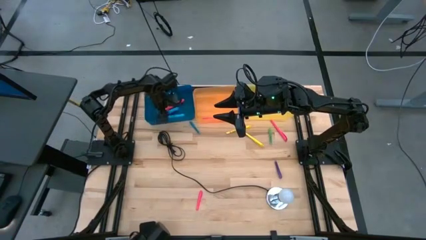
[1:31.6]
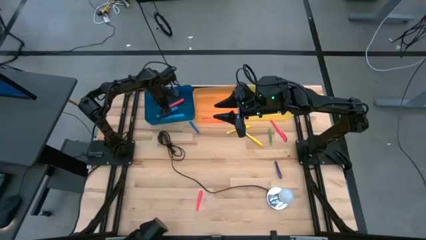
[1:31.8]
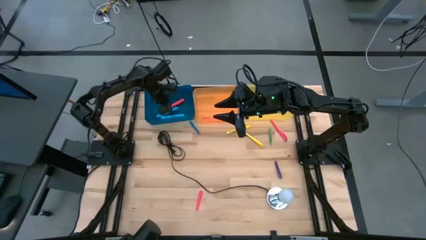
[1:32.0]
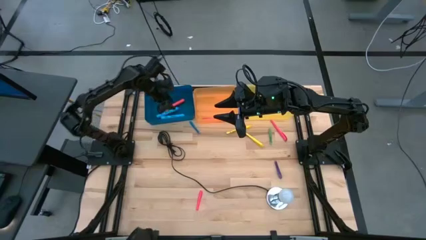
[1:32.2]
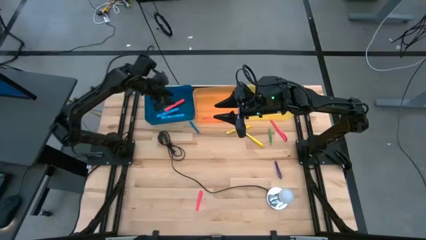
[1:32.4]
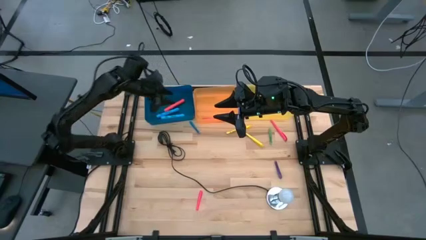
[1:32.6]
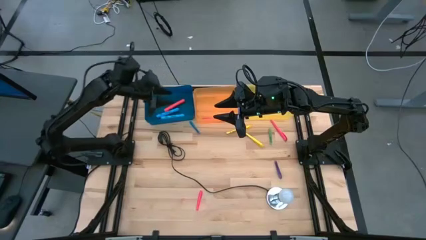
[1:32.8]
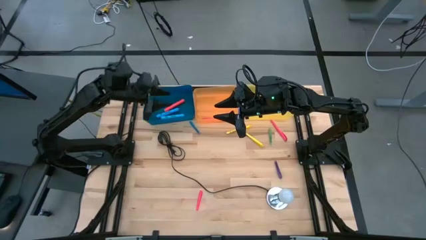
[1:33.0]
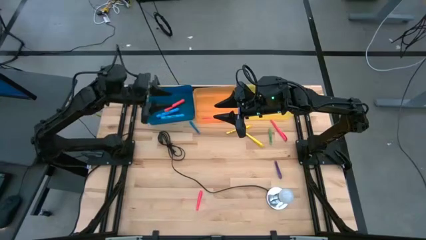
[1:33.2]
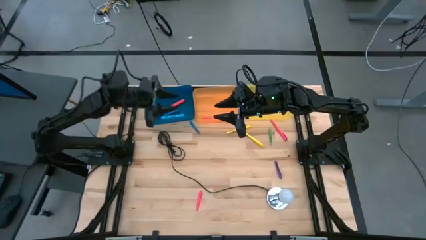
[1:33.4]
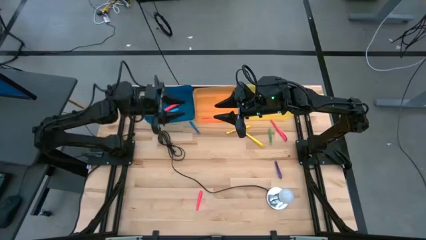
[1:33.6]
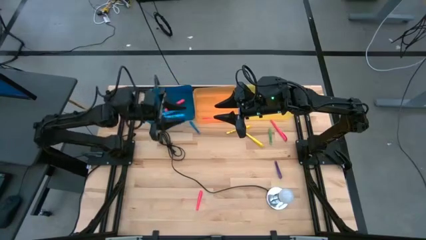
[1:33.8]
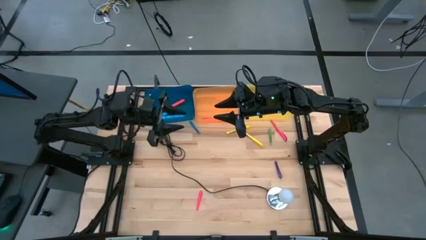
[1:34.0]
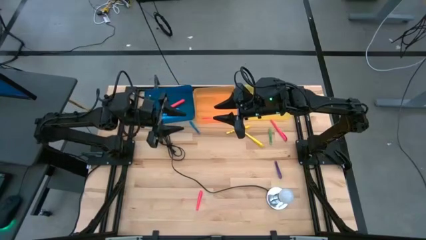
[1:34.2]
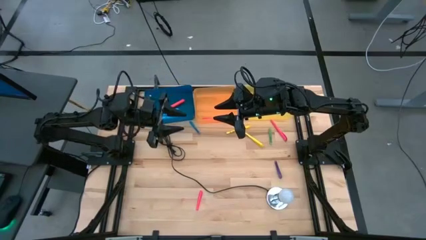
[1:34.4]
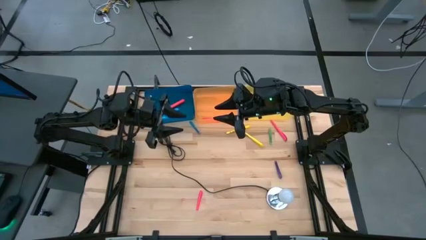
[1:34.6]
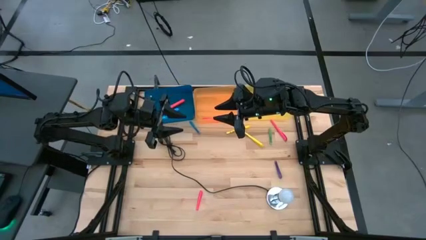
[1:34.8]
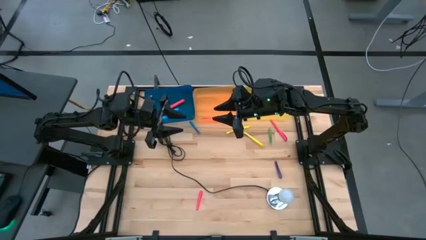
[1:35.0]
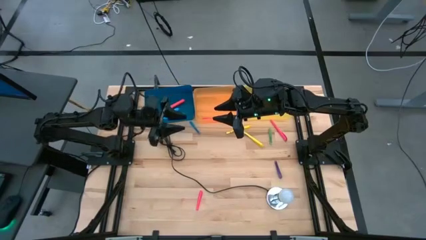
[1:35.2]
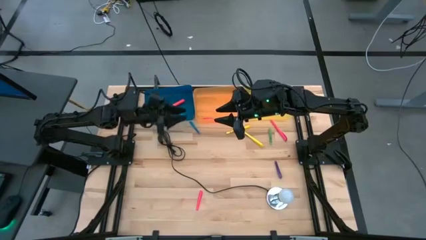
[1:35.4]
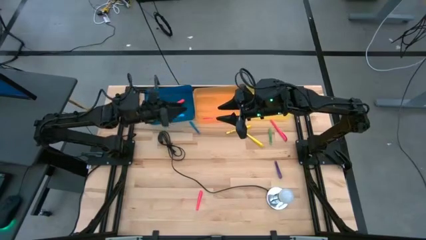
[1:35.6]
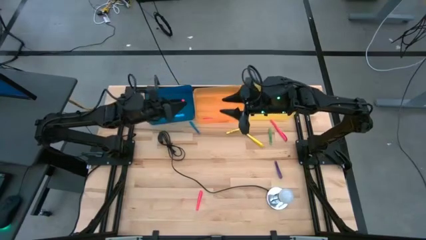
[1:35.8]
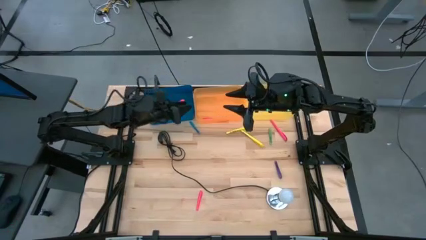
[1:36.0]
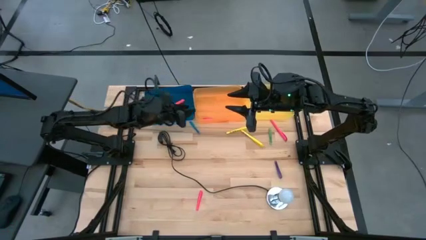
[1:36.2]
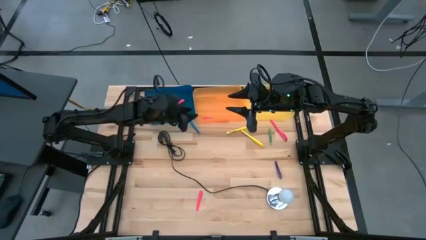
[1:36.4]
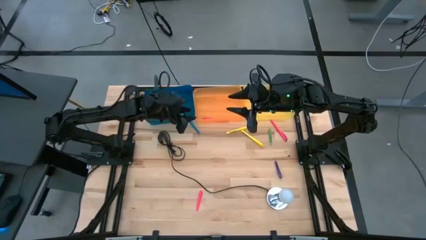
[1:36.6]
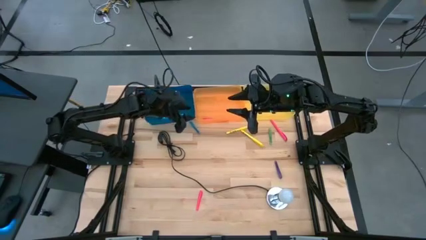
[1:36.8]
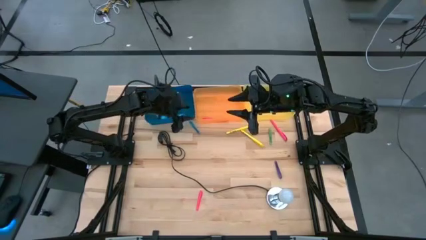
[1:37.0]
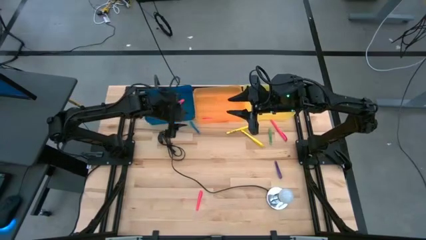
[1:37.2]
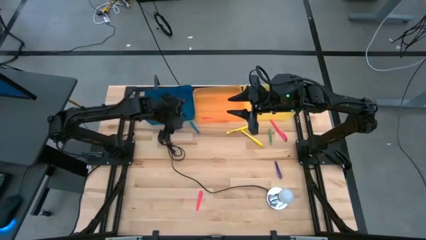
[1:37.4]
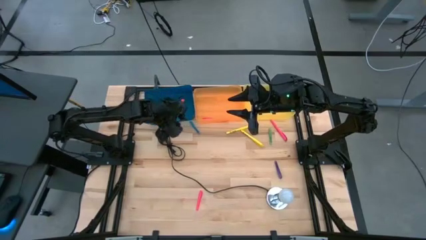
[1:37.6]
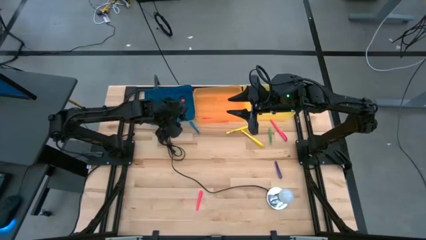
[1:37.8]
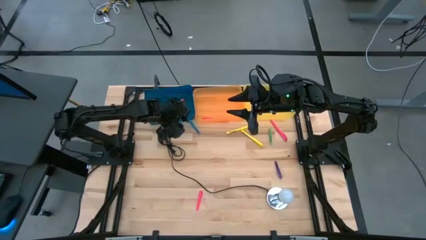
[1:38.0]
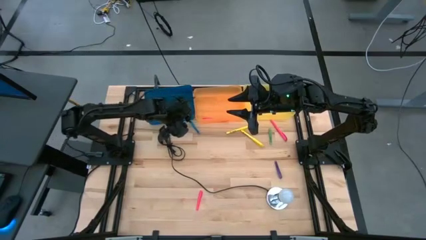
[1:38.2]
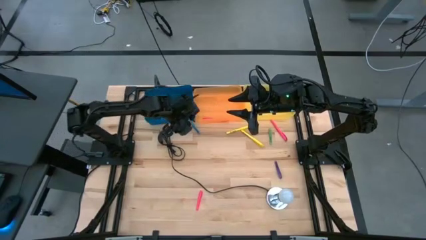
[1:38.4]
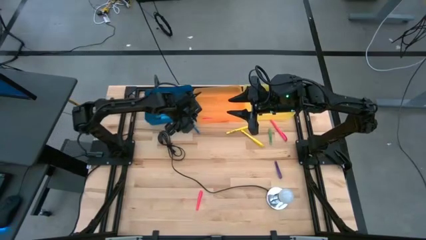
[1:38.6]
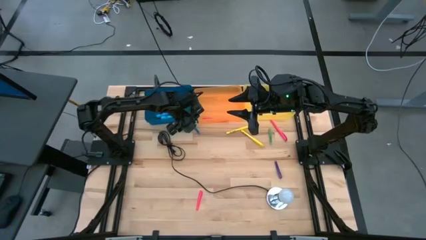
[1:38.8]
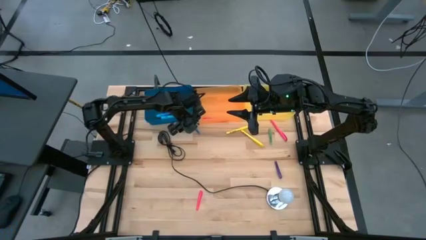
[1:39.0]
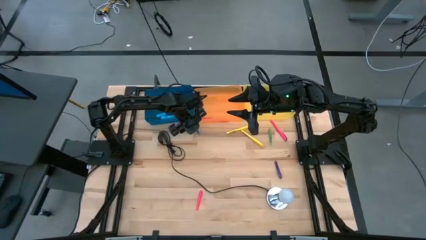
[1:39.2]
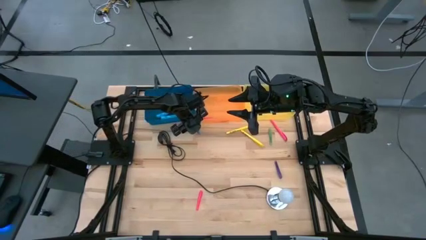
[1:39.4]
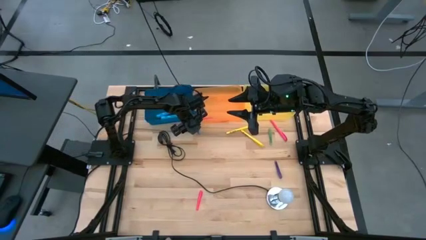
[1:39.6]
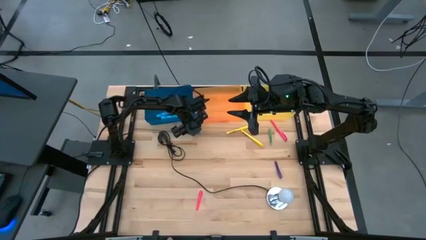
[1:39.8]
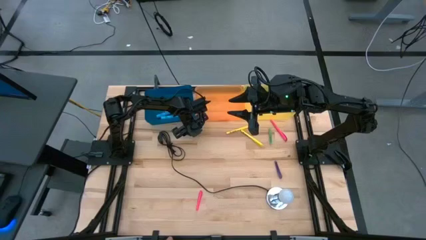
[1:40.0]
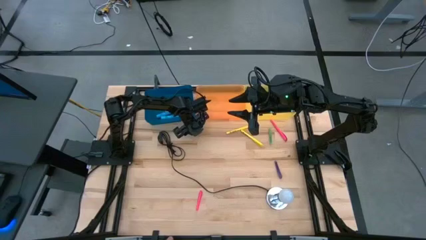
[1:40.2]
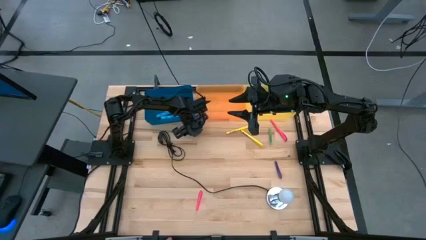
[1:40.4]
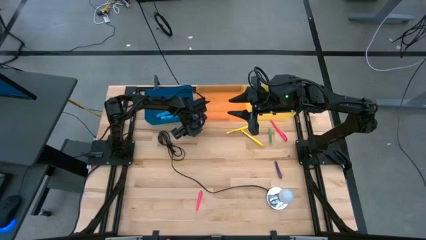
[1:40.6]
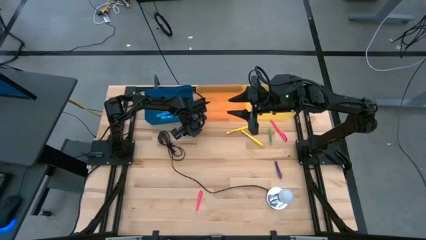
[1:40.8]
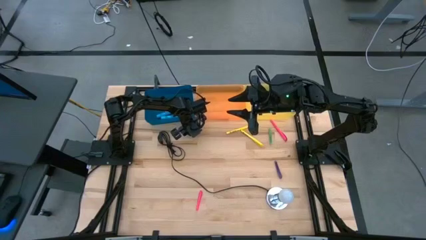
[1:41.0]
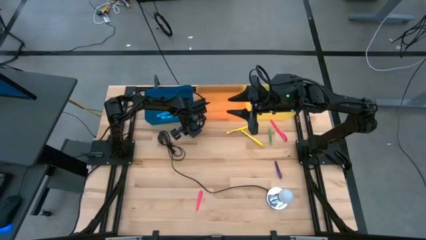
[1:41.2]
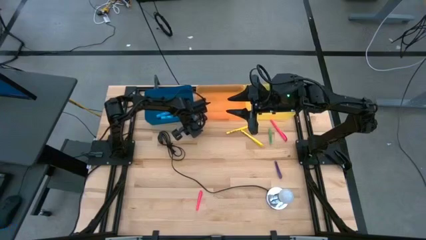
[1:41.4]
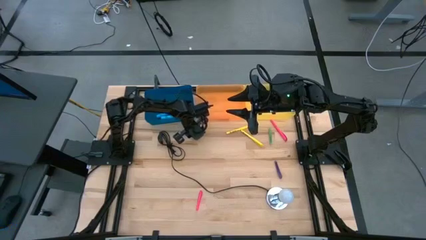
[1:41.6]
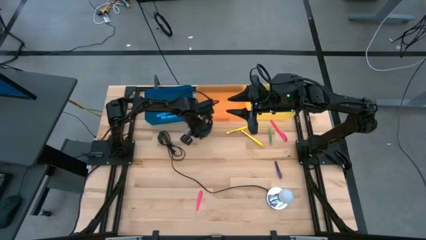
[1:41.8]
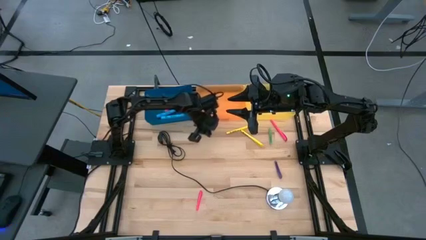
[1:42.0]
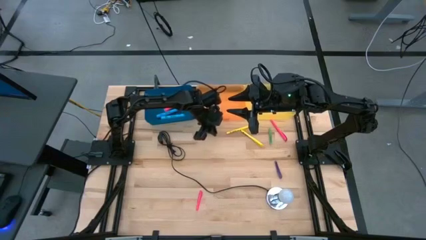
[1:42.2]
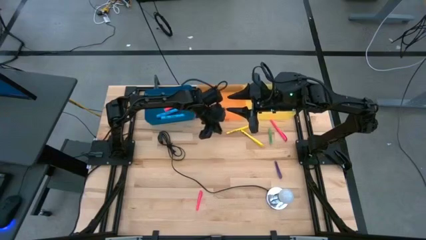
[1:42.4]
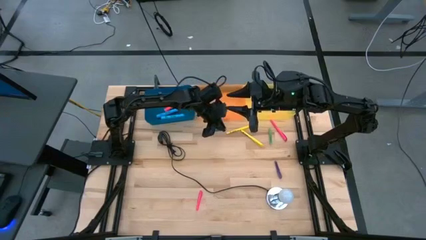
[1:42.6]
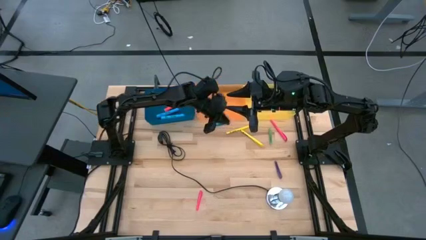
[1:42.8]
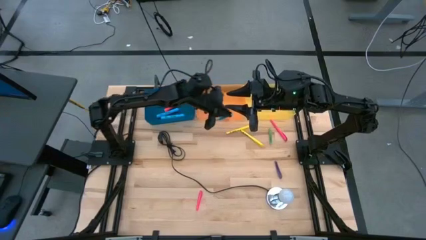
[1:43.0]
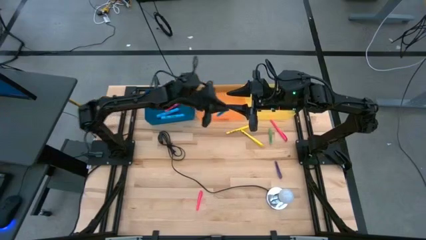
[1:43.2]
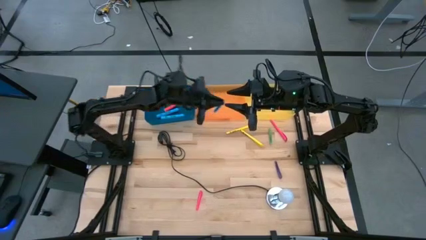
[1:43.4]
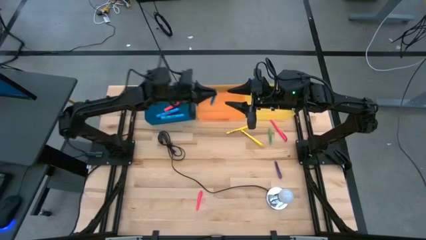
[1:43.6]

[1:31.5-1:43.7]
Task: Pick & Place Markers
Put the small blue pen into the yellow bin

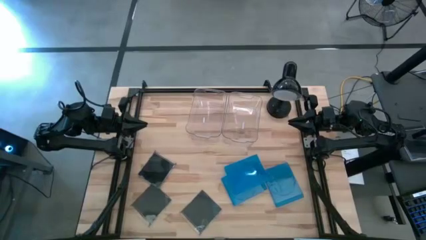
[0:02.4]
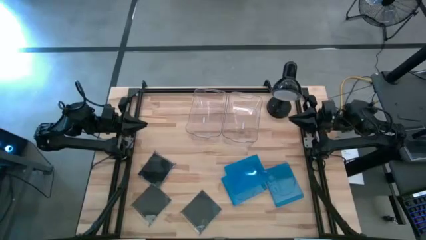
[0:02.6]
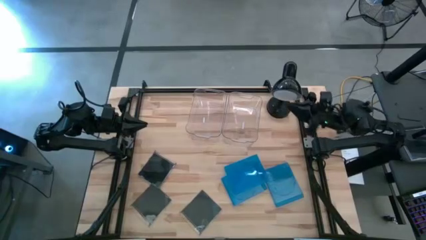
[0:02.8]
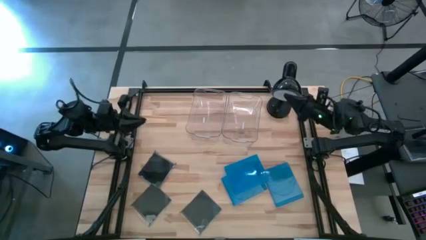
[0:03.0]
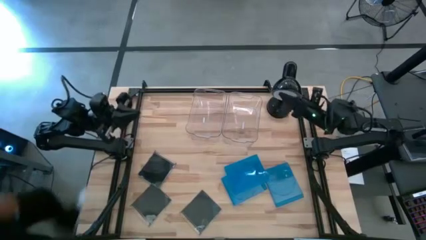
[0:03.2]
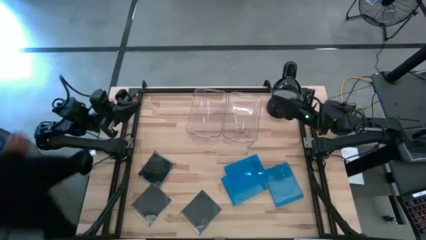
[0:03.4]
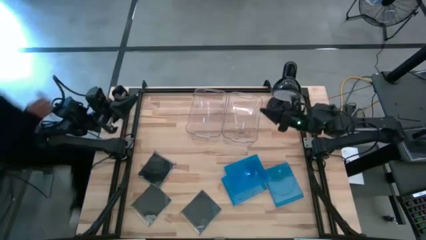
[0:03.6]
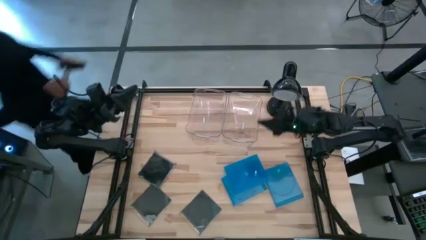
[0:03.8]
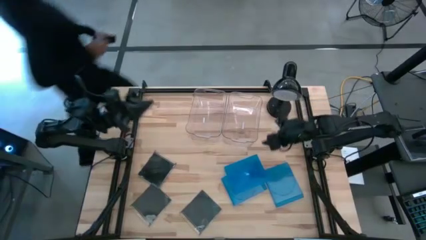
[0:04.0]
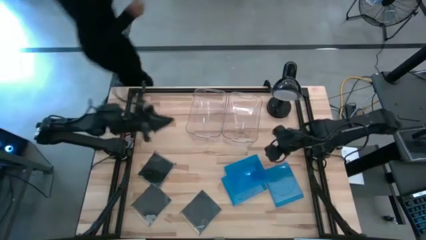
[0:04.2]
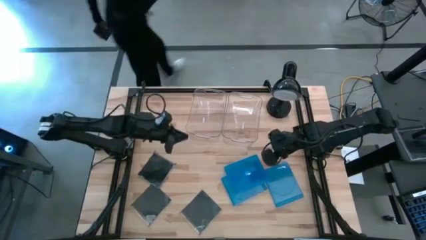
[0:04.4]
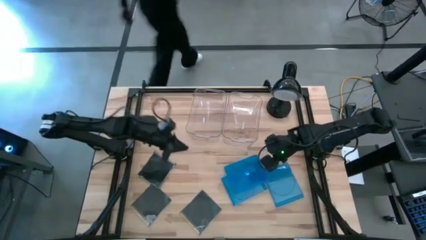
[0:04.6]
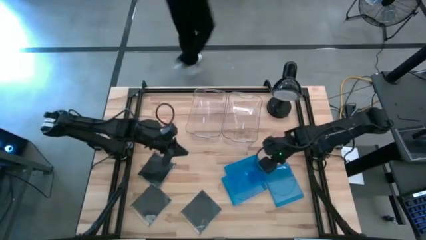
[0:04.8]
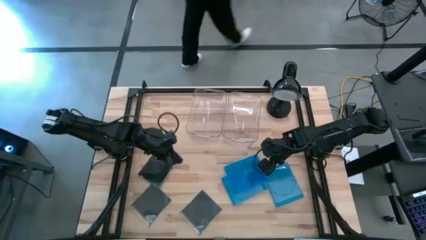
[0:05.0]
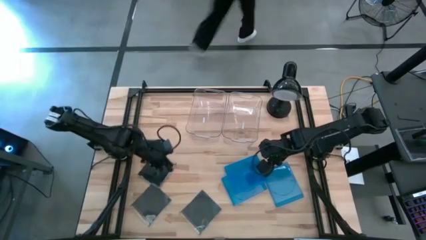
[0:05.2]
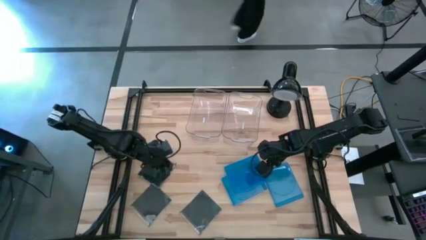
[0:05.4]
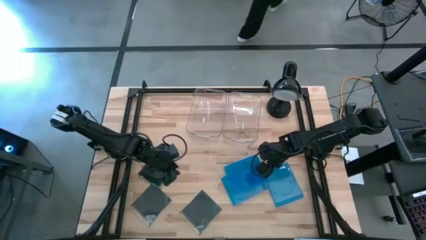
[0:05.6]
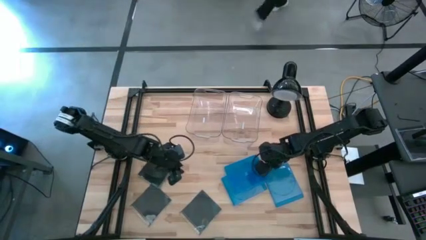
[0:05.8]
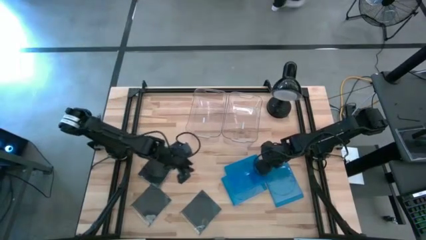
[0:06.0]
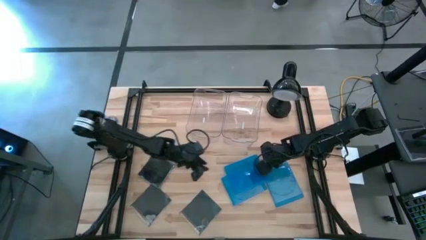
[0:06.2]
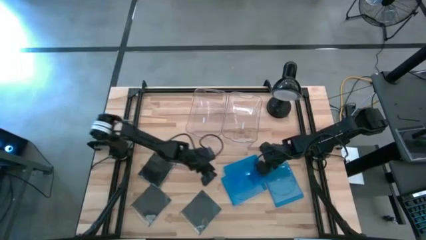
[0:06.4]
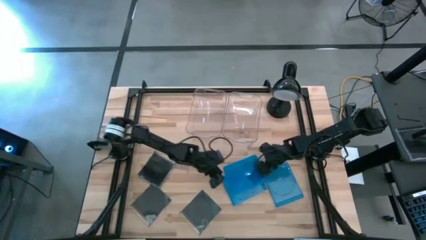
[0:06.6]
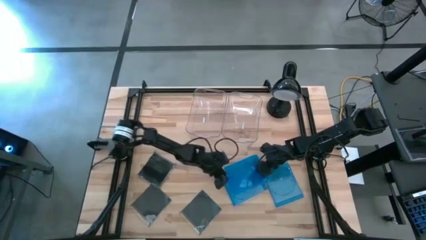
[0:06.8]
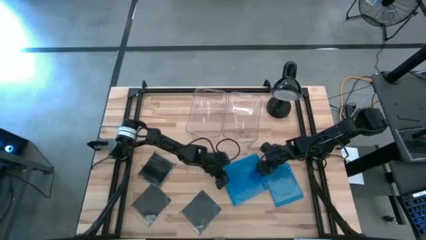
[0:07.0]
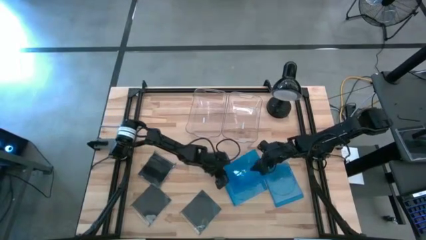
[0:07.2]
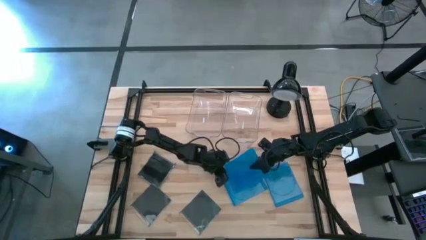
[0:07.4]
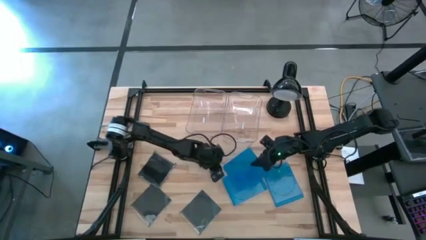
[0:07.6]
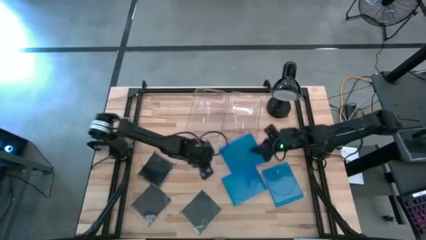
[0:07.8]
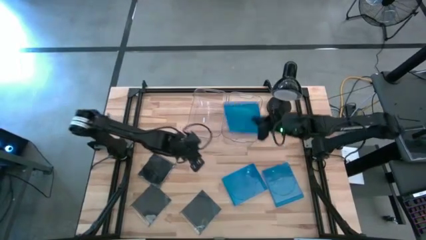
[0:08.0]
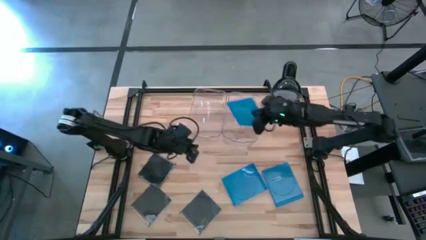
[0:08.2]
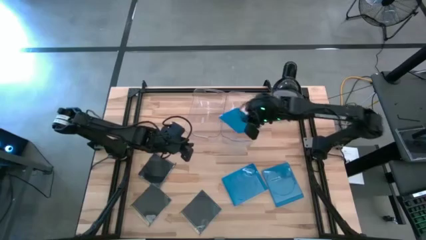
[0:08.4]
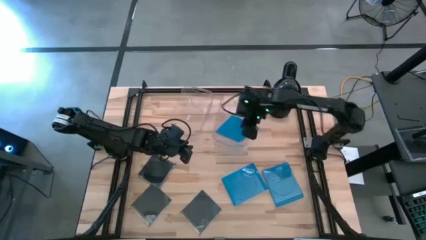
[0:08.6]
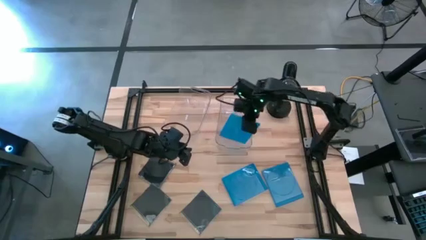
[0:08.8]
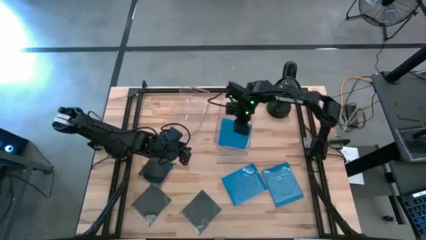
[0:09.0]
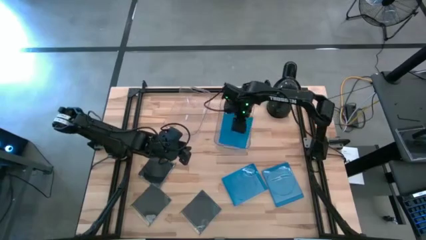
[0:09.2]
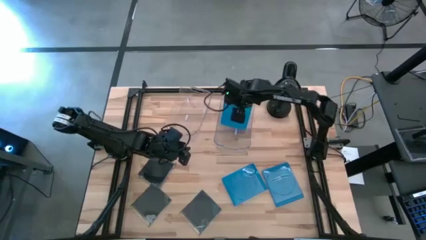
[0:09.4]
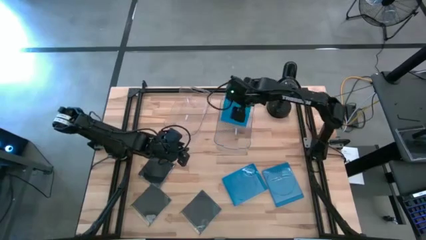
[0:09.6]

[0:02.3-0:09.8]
Task: Pick & place jewel cases by type
Put the top blue CD case into the right transparent bin
